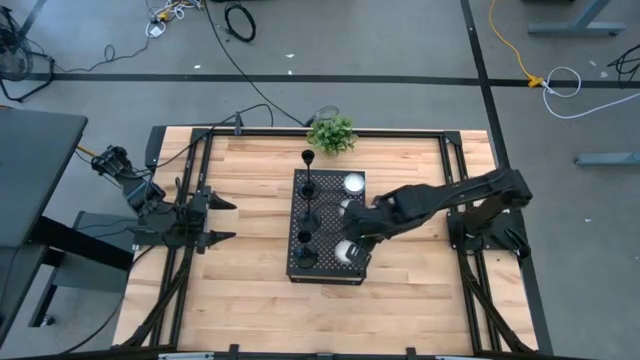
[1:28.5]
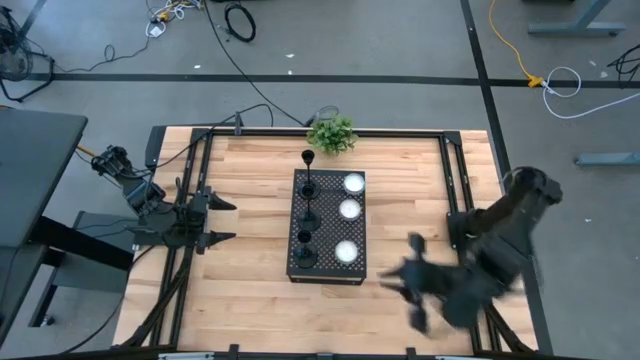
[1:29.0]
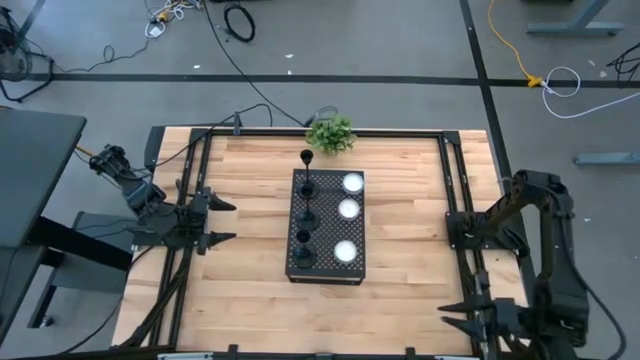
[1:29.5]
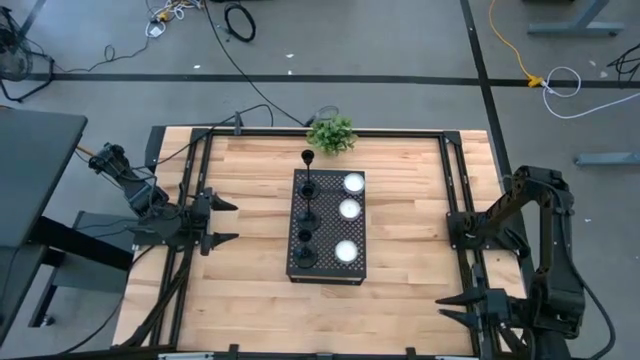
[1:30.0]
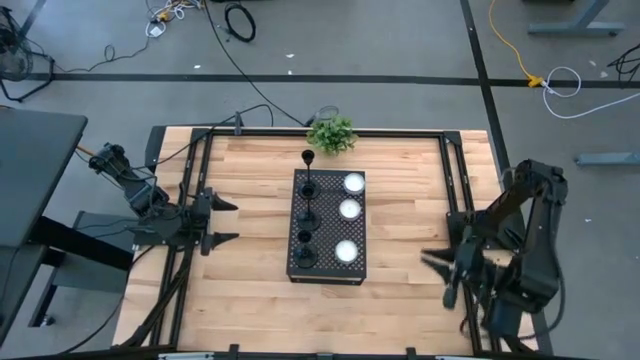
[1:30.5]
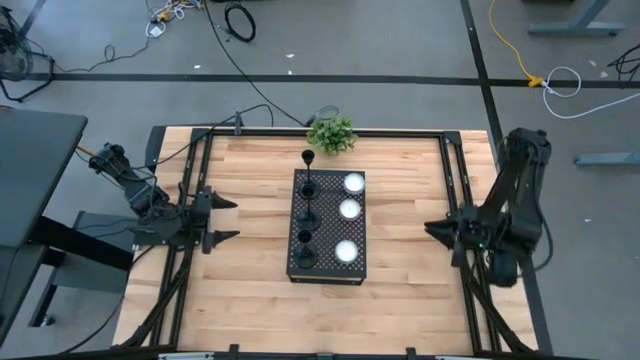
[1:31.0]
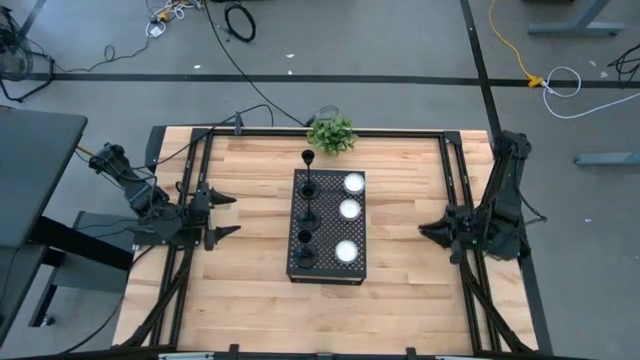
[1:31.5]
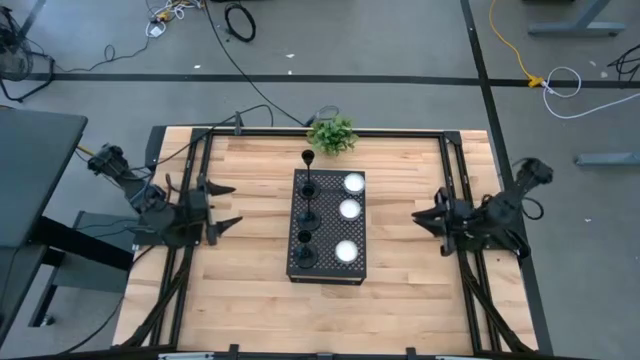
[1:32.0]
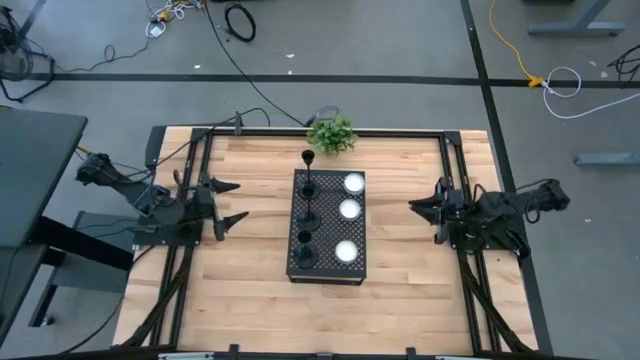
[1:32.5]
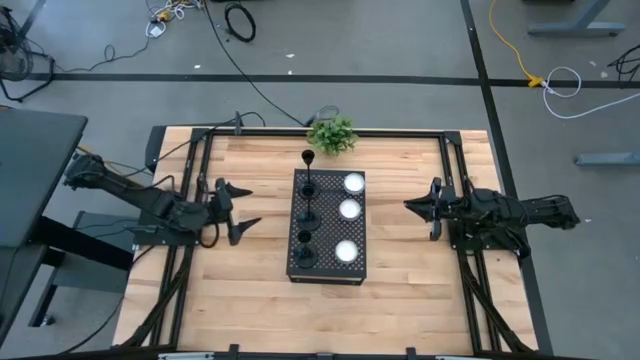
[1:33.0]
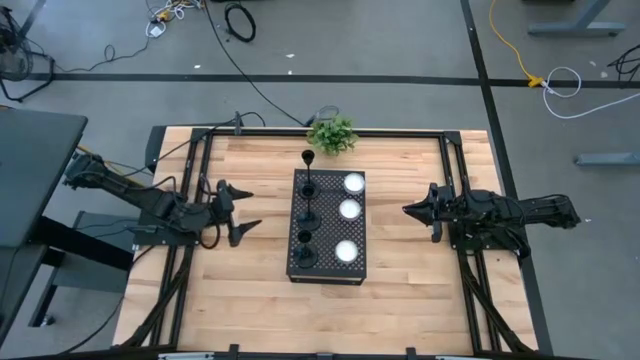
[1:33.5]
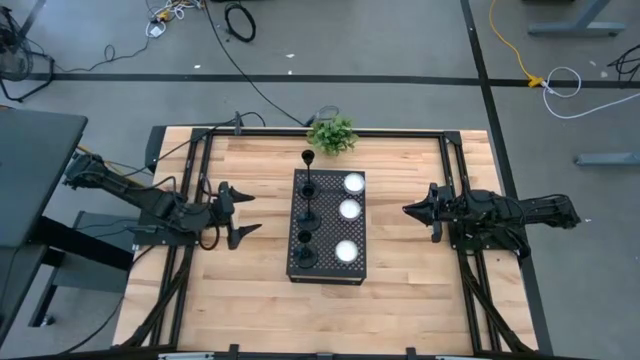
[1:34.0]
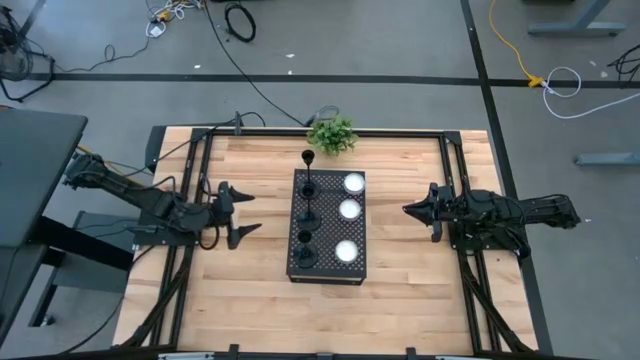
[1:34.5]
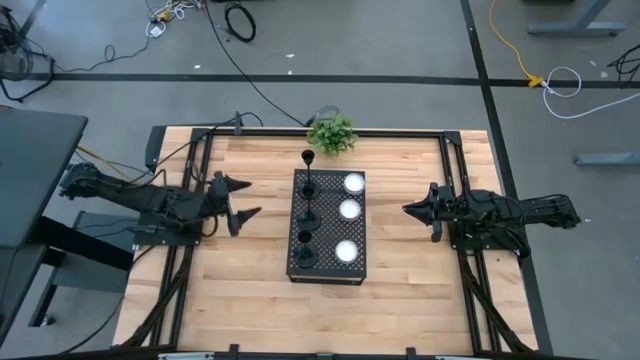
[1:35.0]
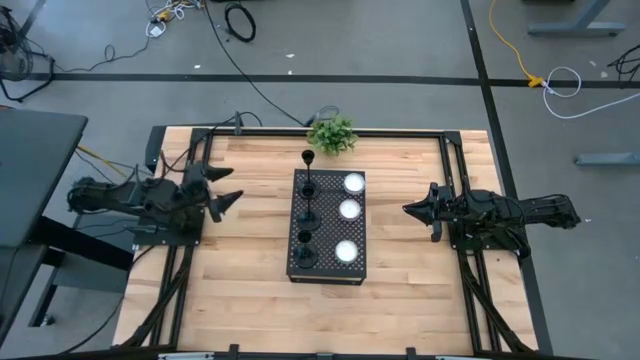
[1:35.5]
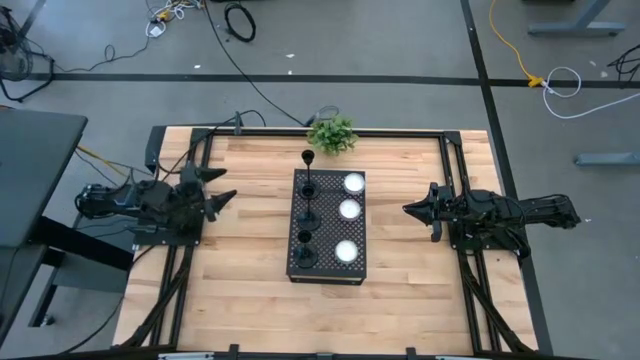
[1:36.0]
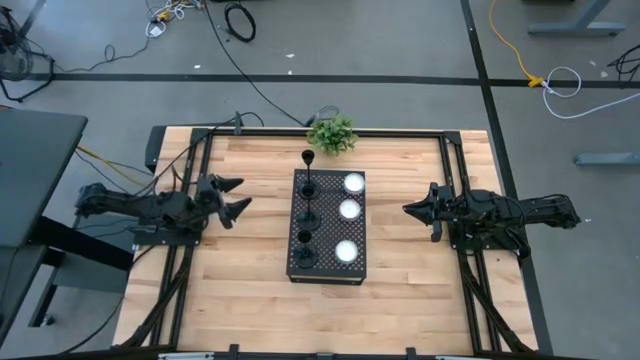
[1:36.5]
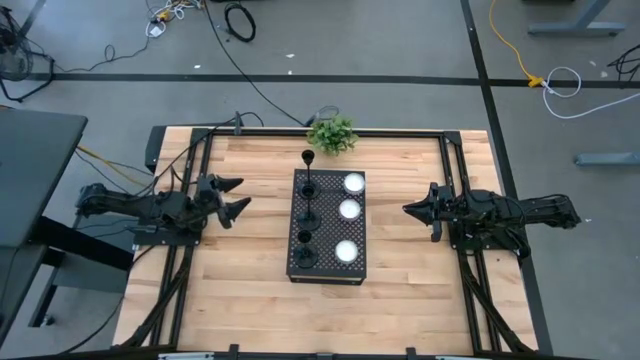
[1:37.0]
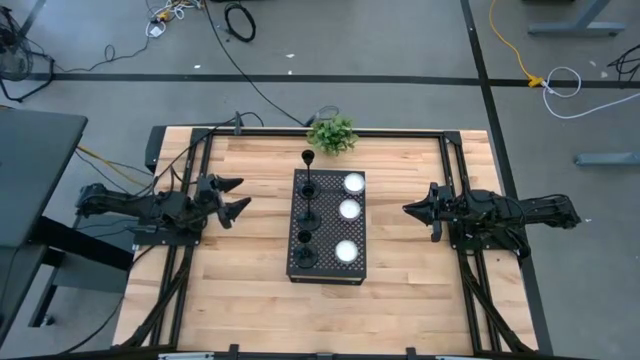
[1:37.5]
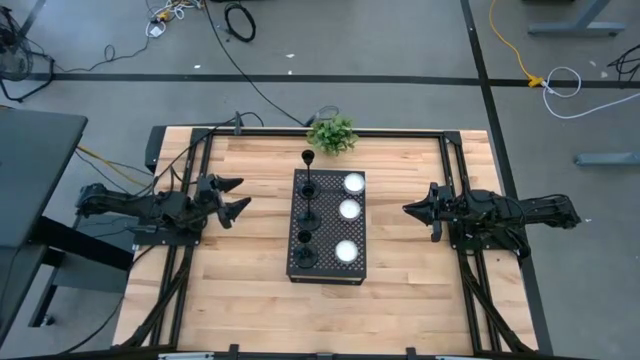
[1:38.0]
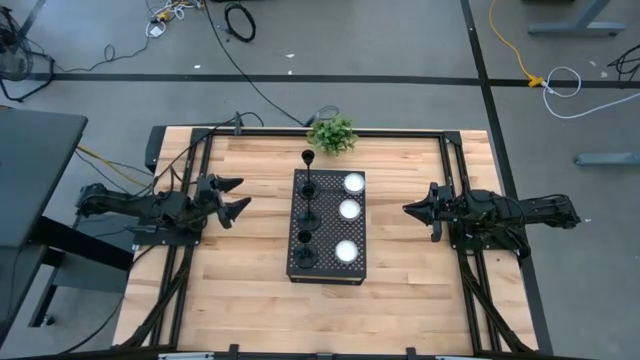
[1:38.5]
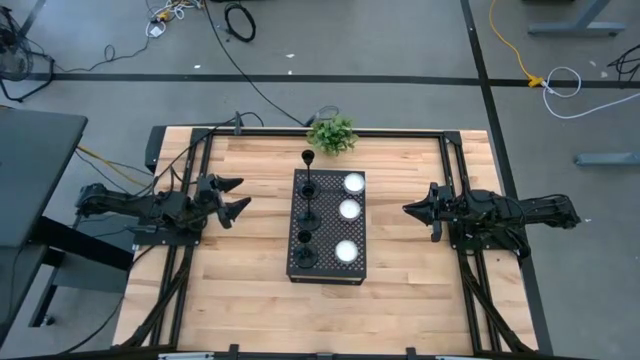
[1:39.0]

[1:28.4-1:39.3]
Task: Pick & Place candle stick holders
Return to Home Position

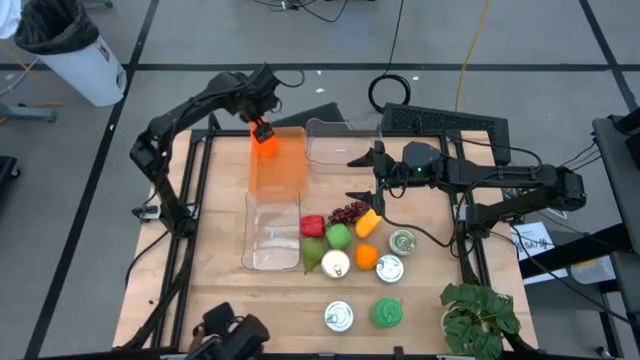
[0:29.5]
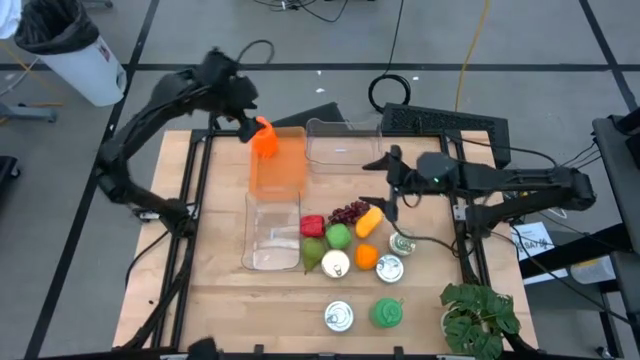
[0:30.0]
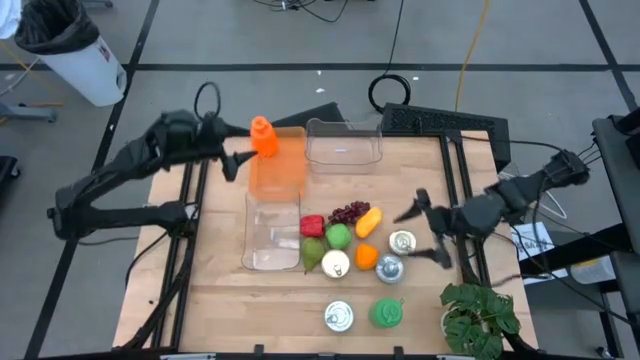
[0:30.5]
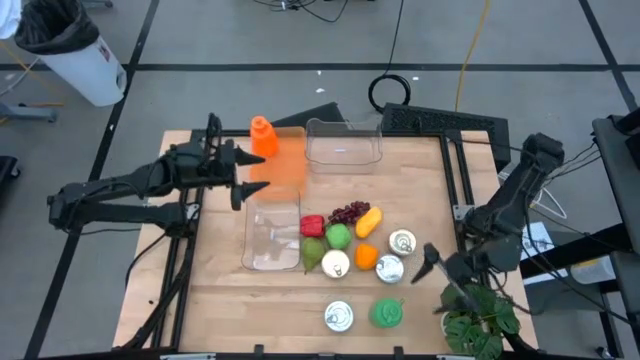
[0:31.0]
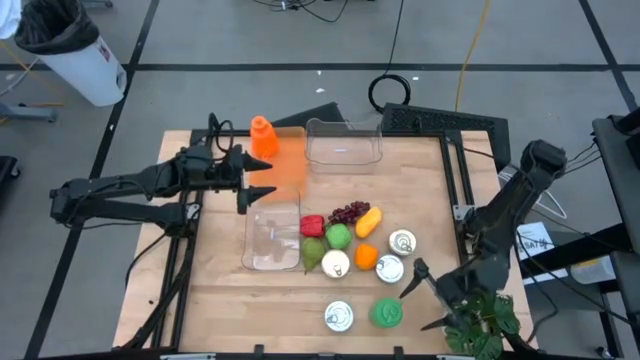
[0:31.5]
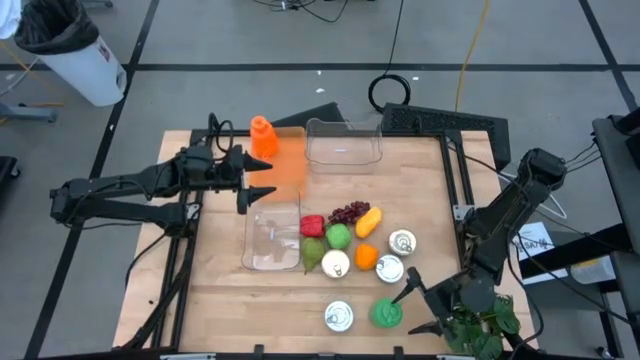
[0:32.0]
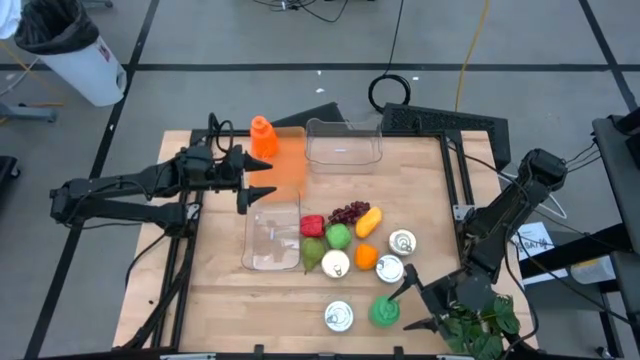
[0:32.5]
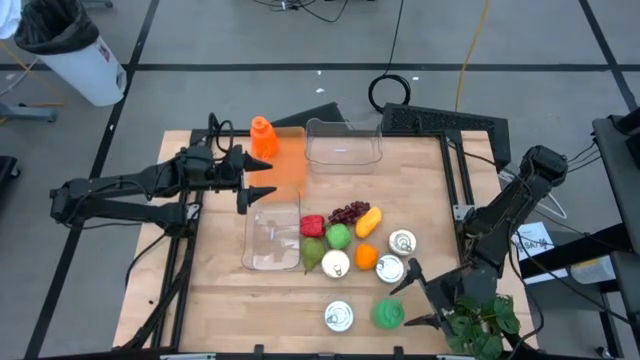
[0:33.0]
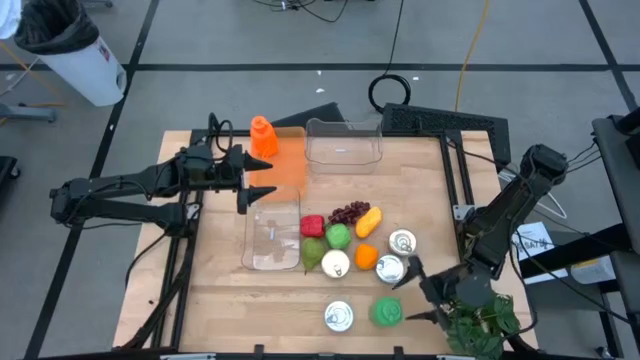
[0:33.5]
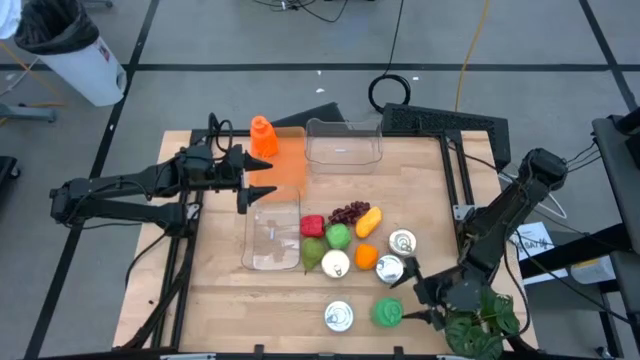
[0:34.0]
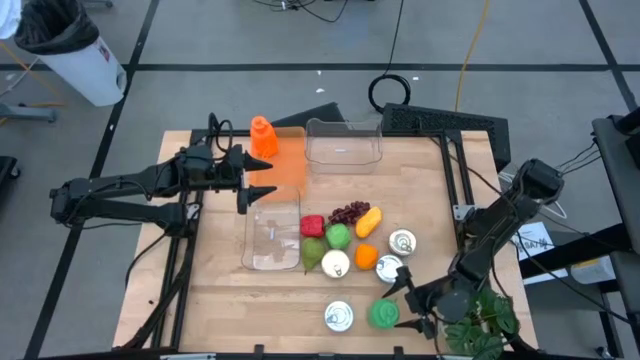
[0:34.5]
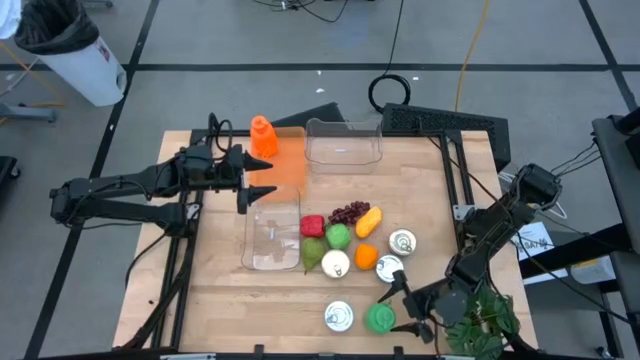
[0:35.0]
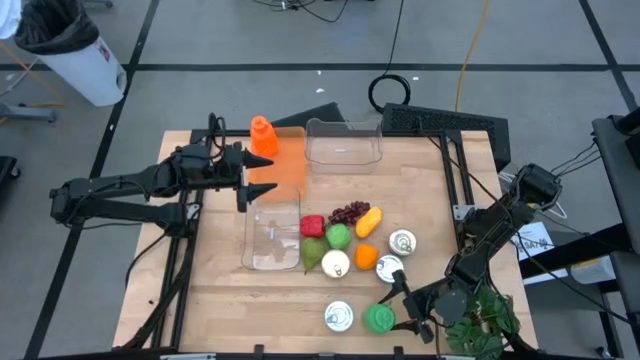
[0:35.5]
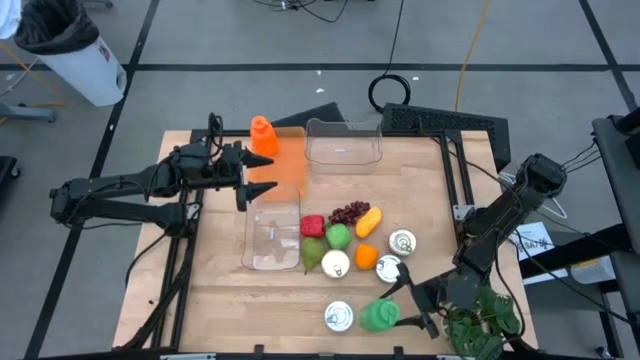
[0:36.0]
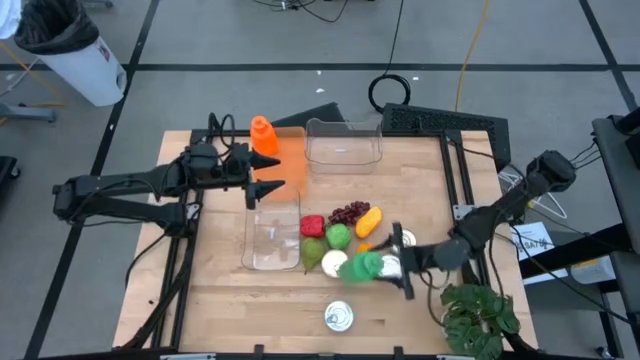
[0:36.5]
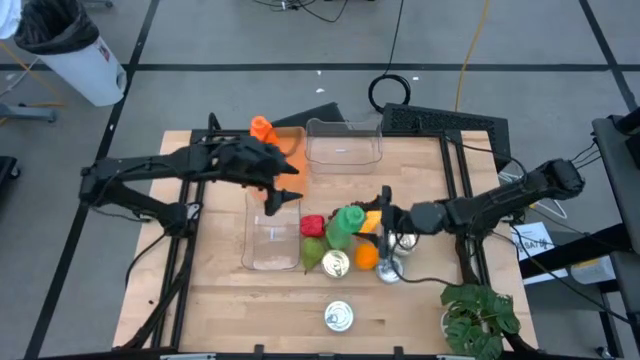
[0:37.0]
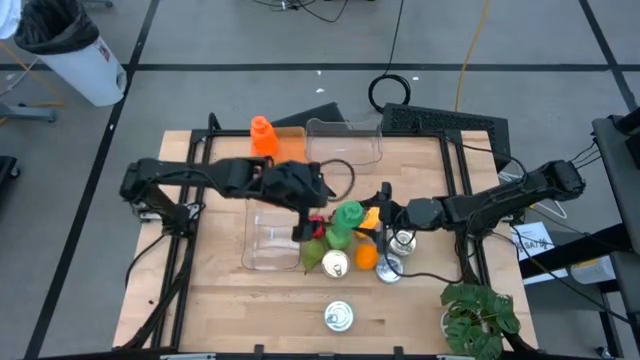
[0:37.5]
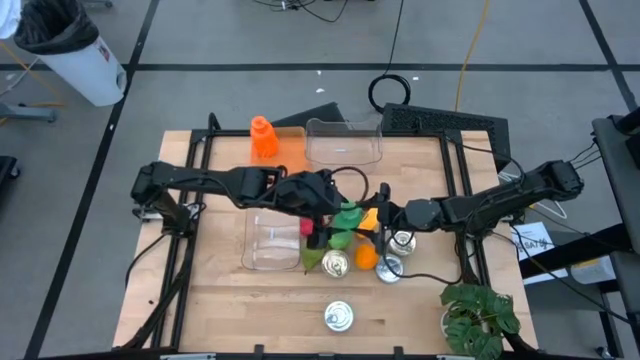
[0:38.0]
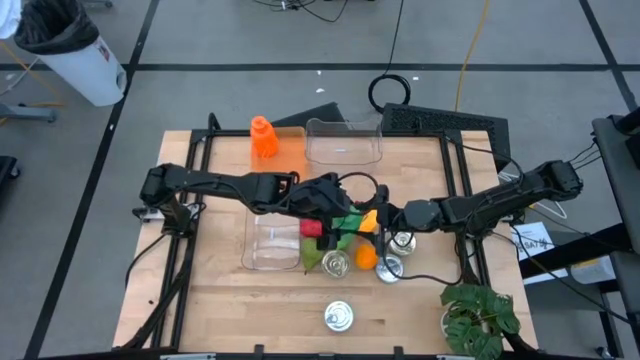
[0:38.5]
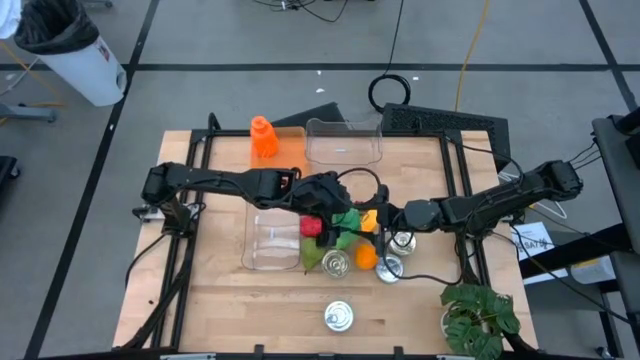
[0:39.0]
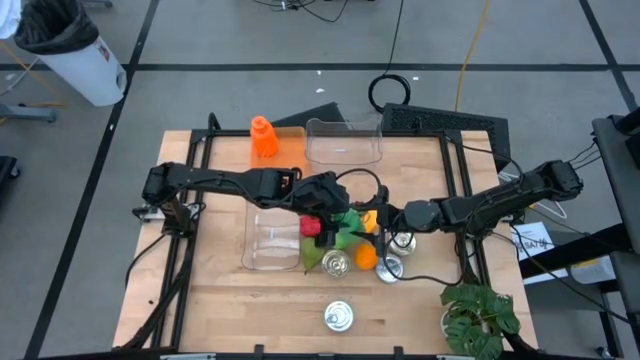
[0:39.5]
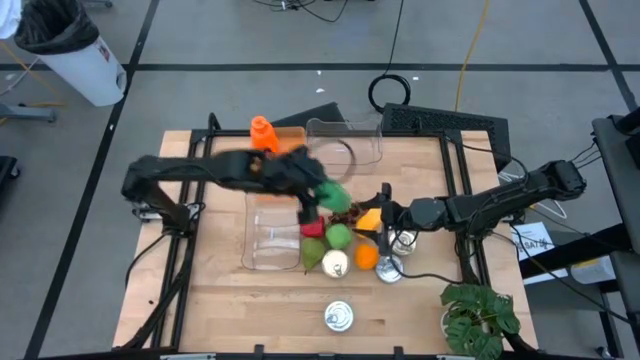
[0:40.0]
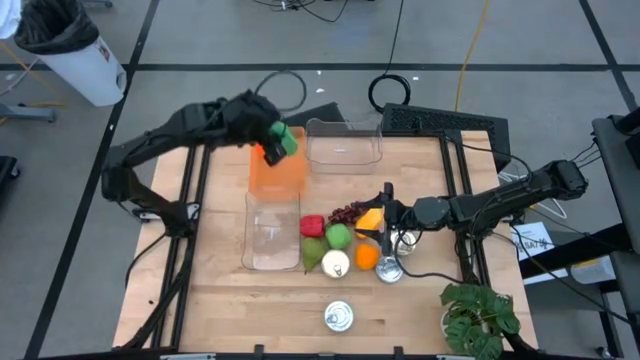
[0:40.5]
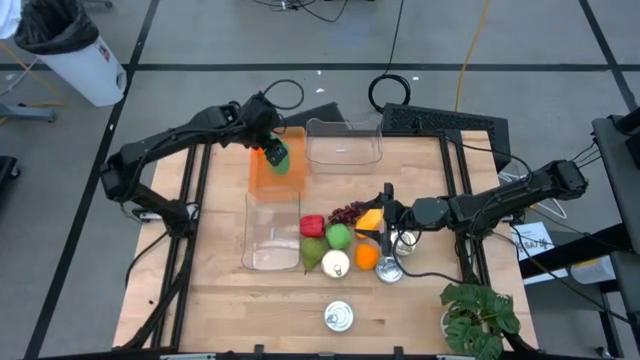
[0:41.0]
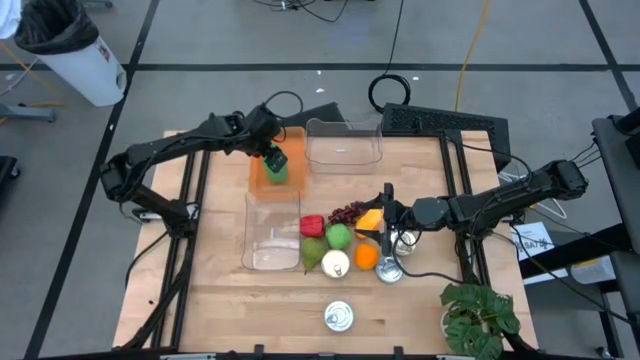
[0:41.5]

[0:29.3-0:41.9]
Task: Pick & Place Food Item
Put the green tumbler into the orange bin
